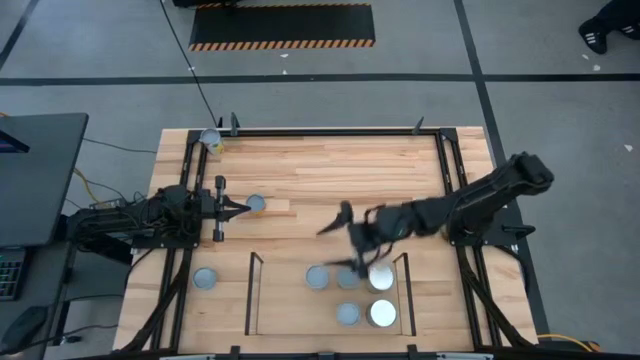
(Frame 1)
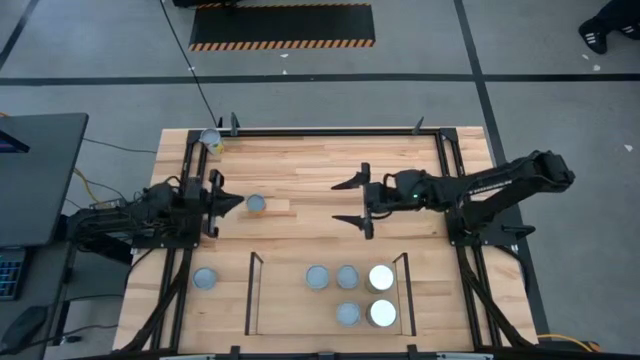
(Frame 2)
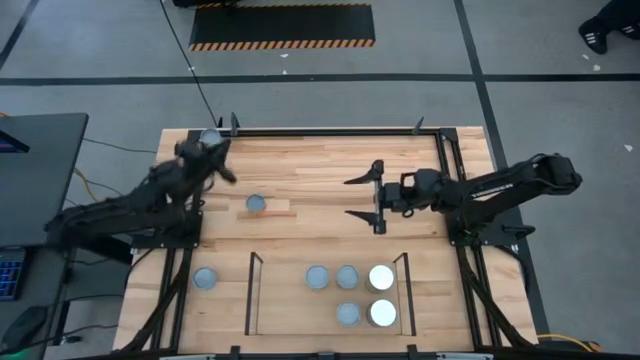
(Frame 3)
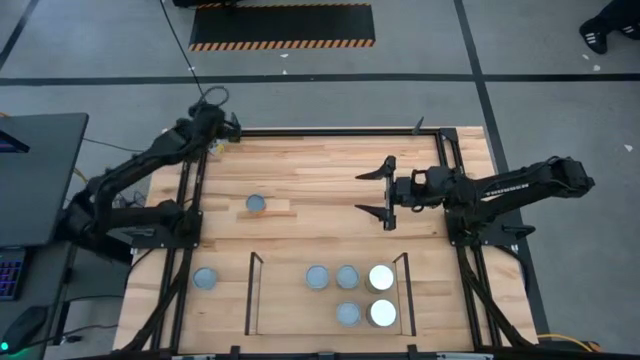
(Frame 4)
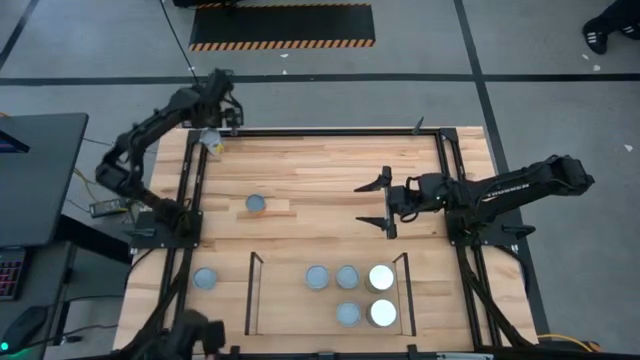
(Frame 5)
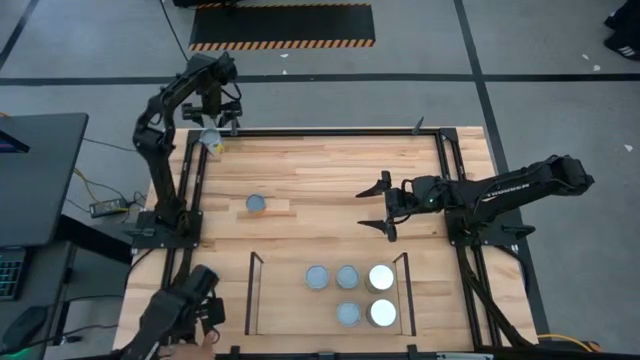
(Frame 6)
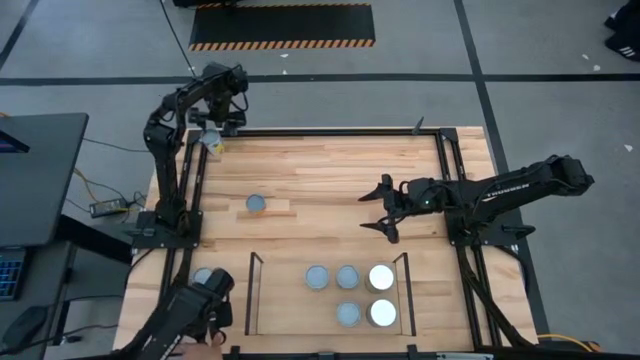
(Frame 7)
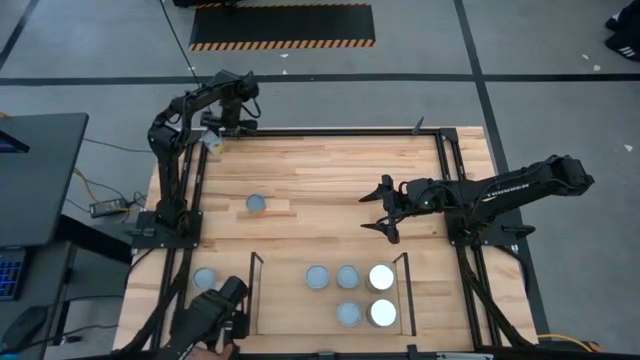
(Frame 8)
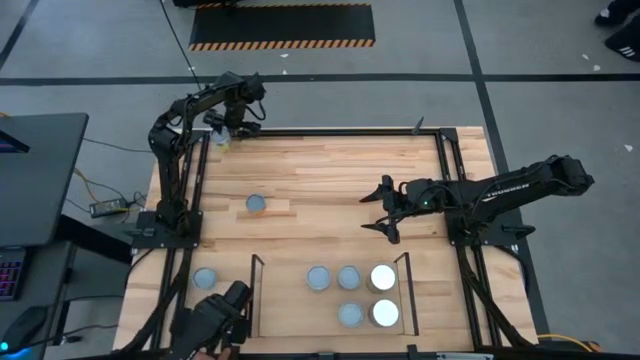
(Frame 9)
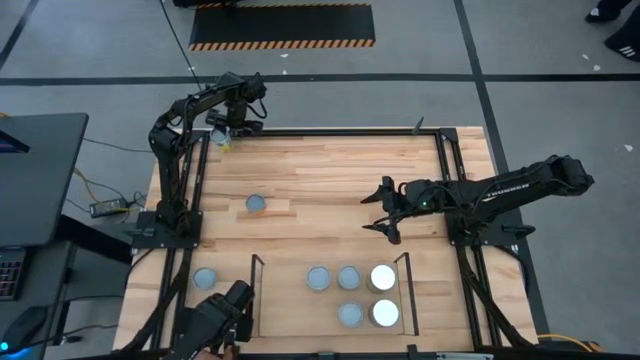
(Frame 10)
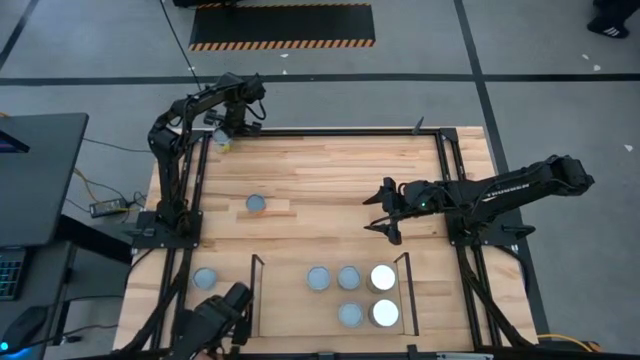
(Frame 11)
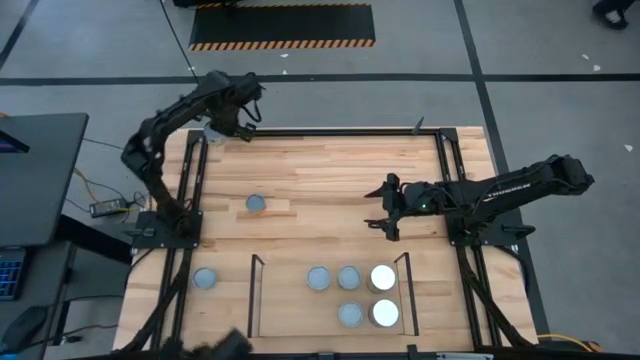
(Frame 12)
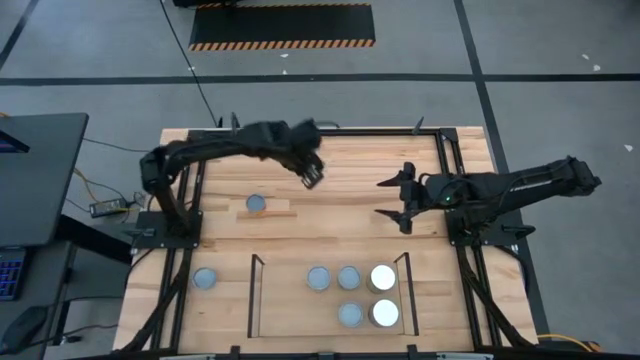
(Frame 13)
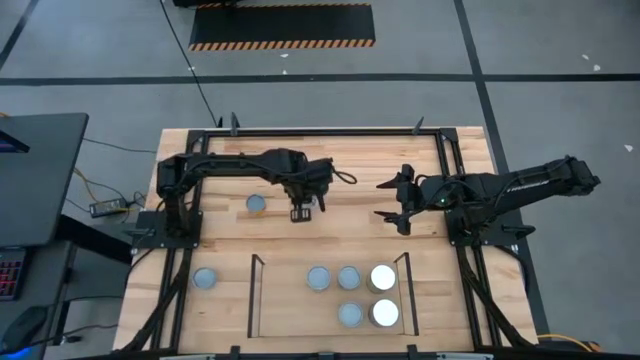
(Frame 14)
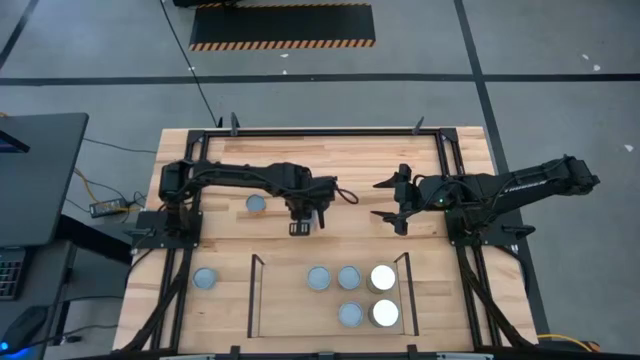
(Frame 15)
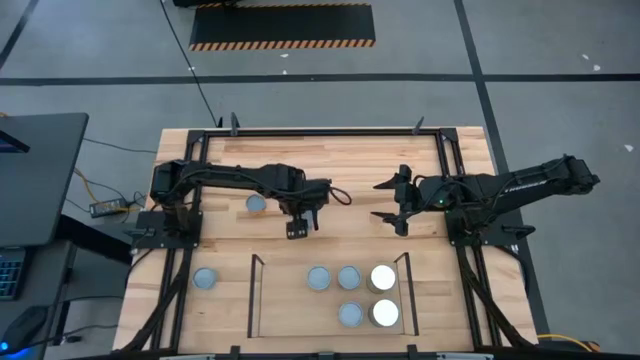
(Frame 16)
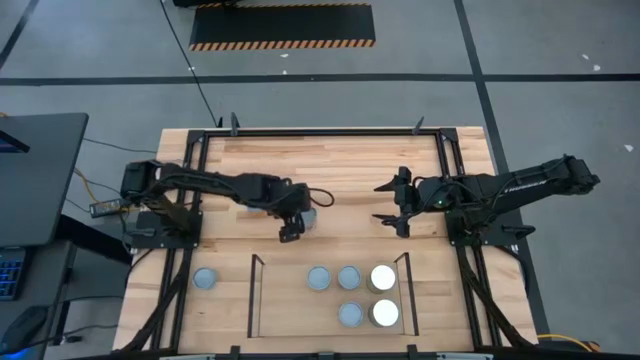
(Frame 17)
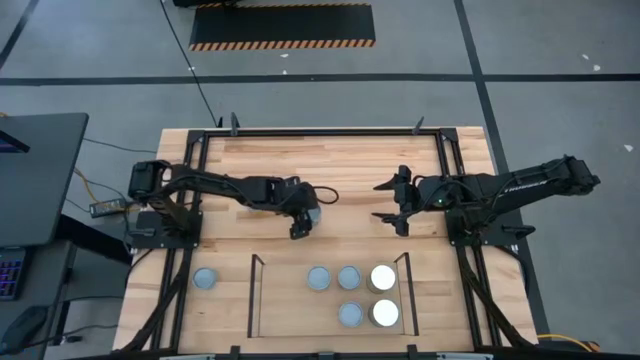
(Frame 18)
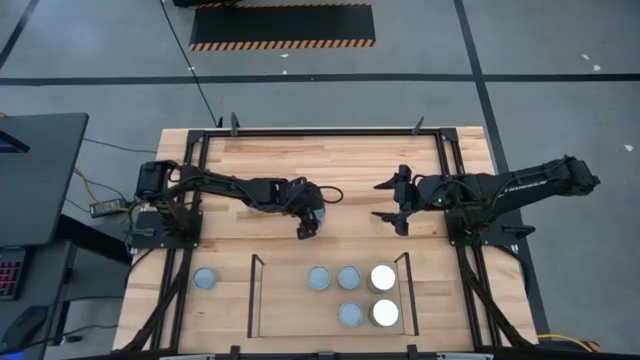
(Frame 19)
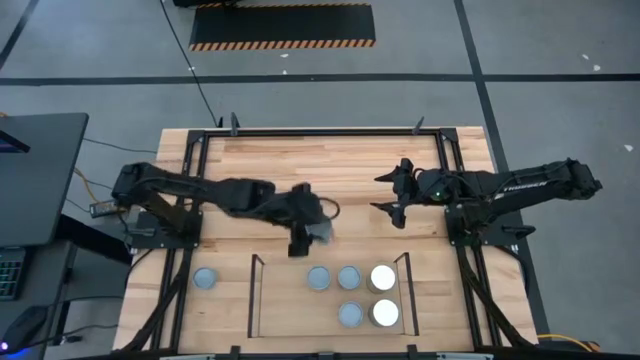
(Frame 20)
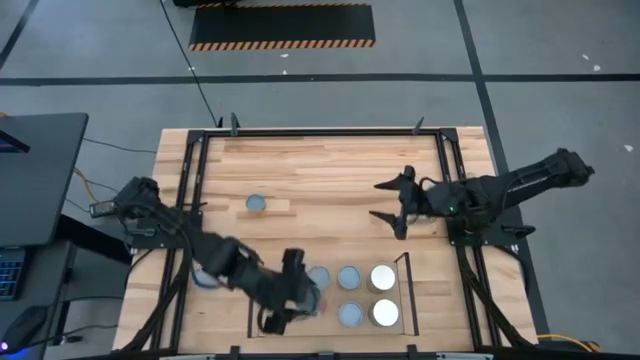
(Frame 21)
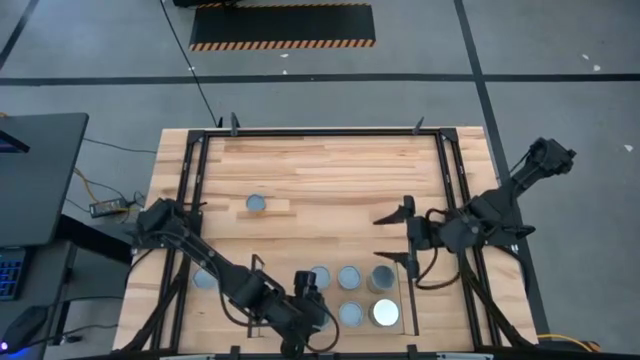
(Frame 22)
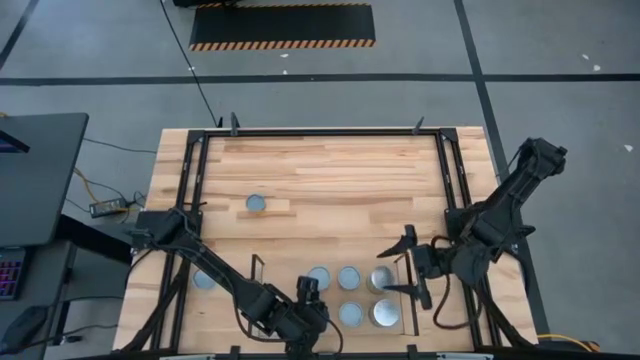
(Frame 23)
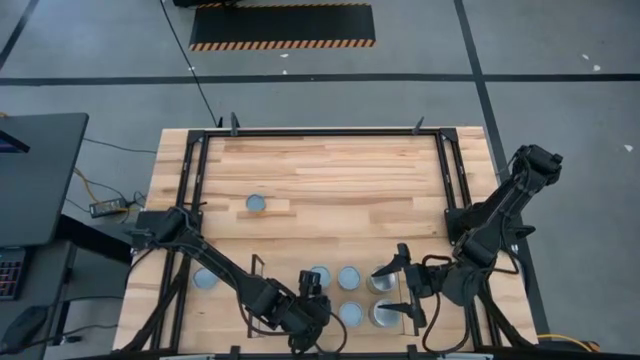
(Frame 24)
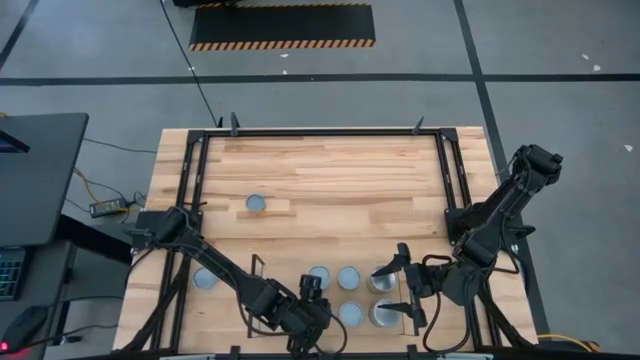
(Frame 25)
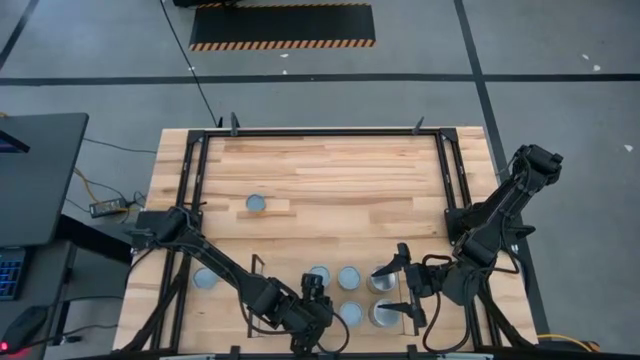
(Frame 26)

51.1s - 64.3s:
Task: Pick and place cans onto a shelf
Put the canned mix fruits on the shelf

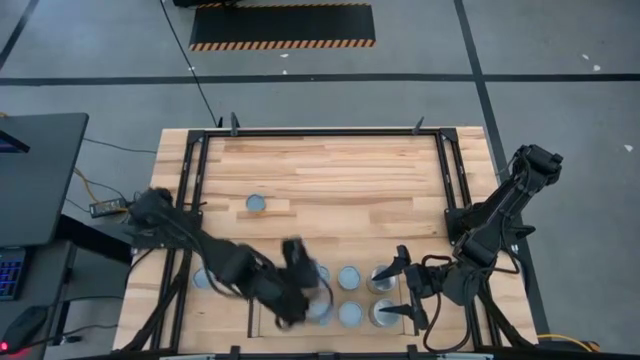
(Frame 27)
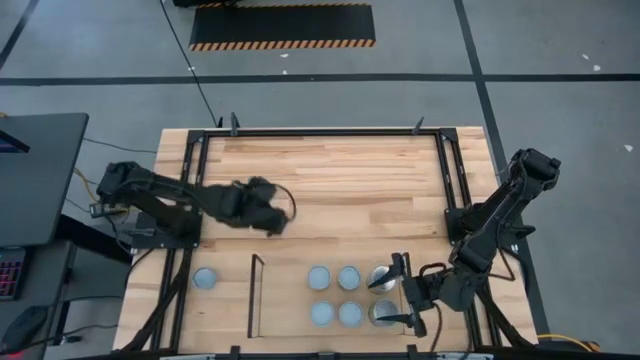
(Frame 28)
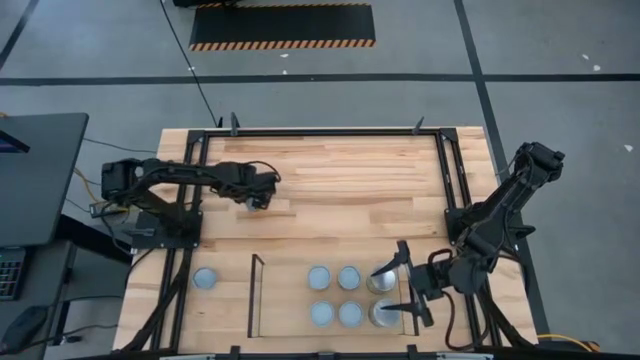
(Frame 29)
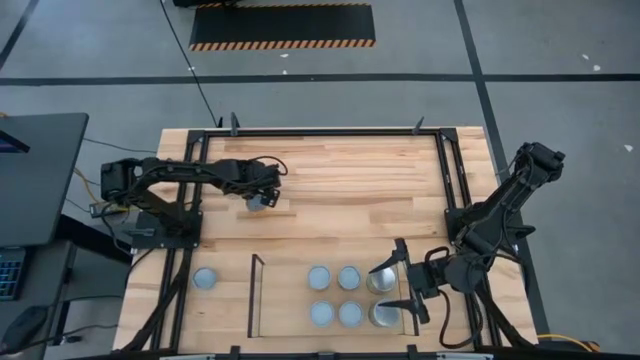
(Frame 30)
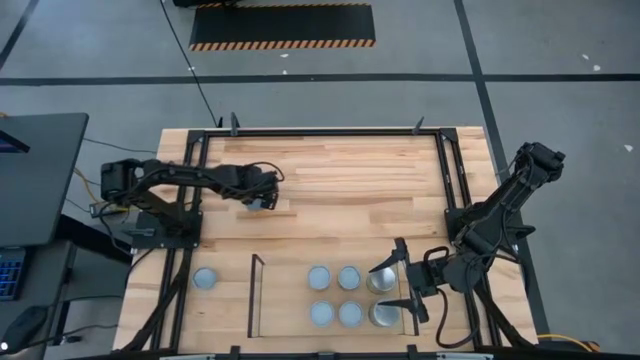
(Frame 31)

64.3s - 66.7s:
Put the canned pineapple can on the shelf

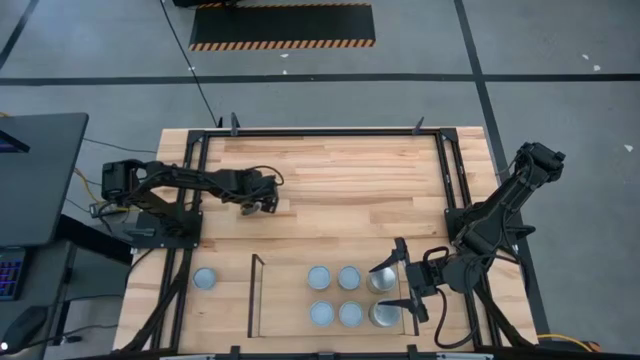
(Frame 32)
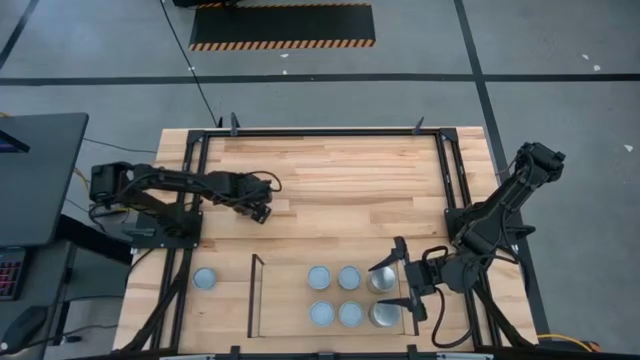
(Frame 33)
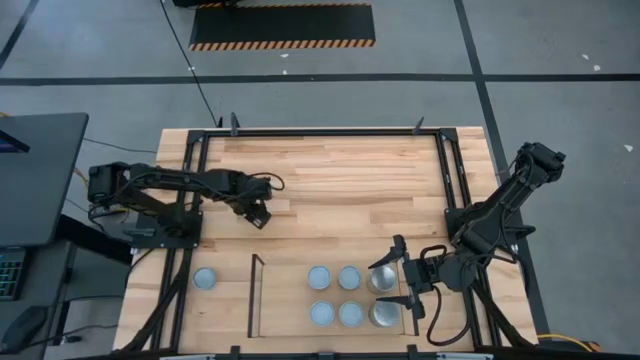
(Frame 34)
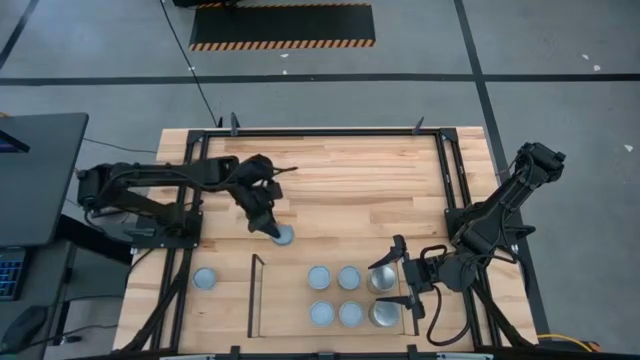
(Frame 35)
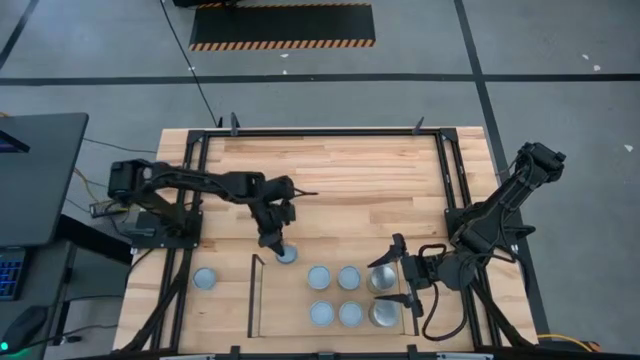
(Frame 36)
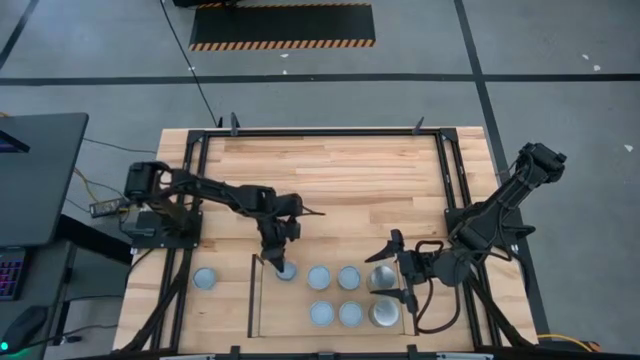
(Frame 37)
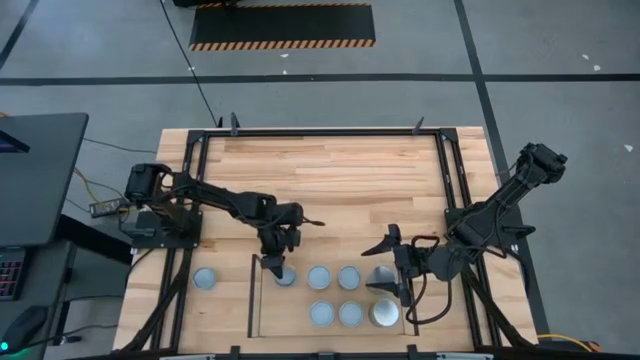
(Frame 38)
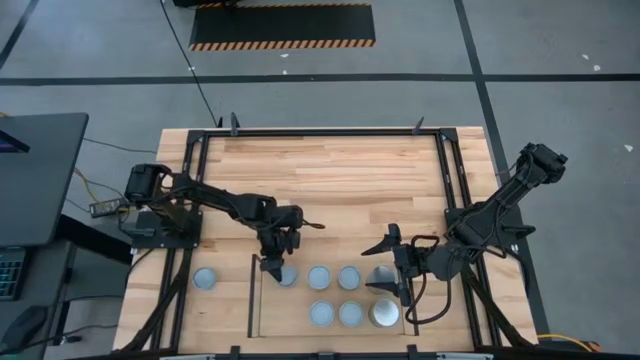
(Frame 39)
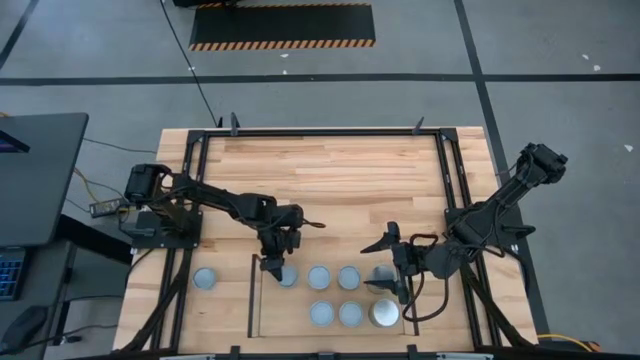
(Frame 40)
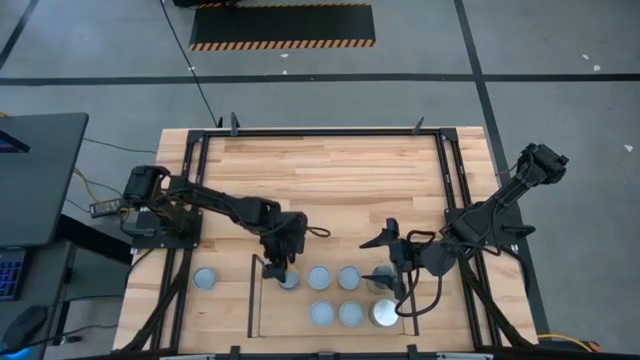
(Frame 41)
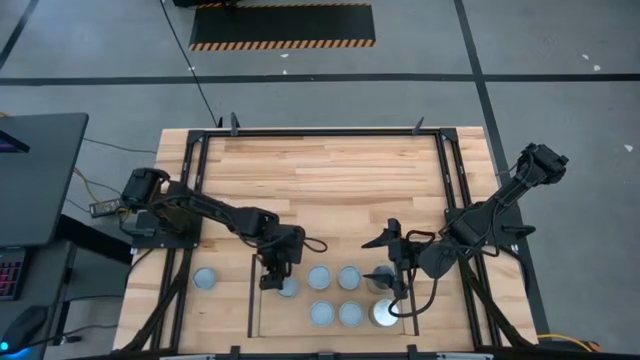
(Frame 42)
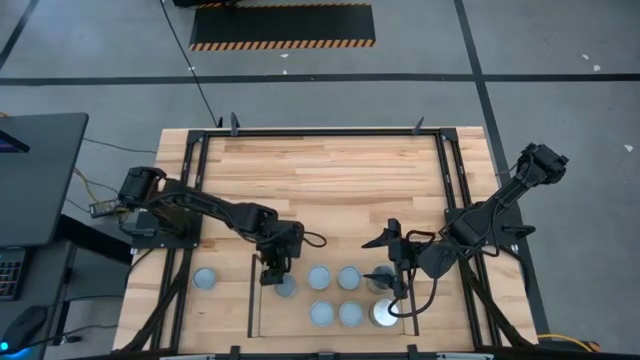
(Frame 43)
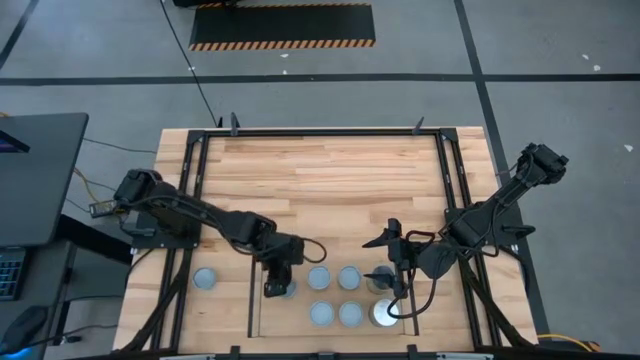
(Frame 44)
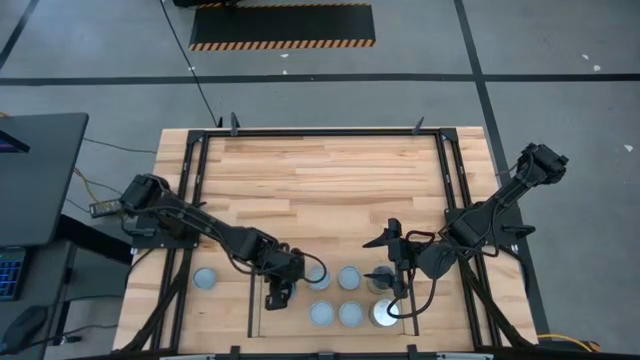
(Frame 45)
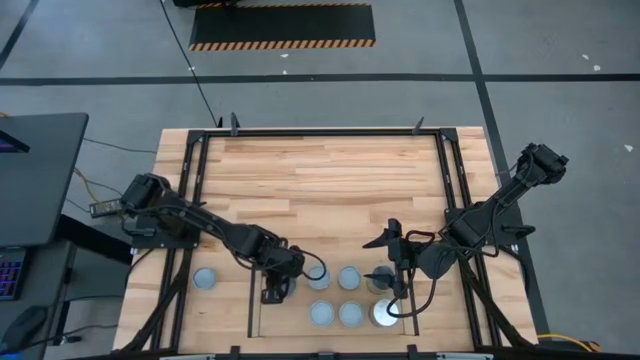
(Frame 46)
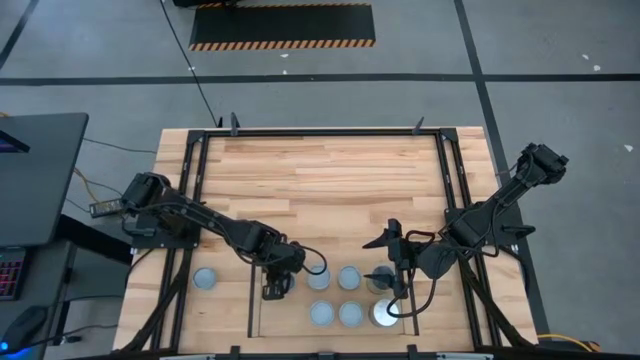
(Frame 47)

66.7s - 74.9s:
Put the canned pineapple on the shelf
